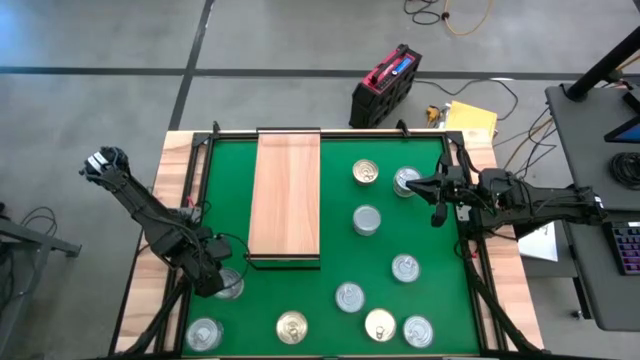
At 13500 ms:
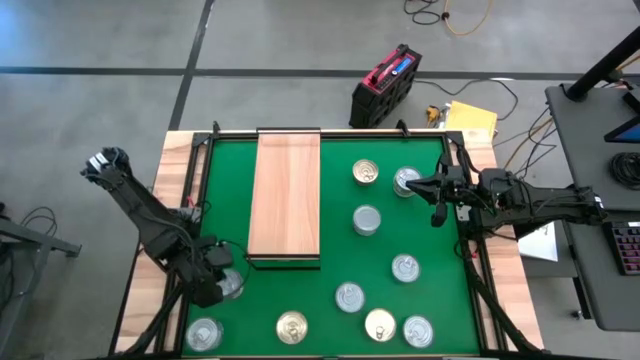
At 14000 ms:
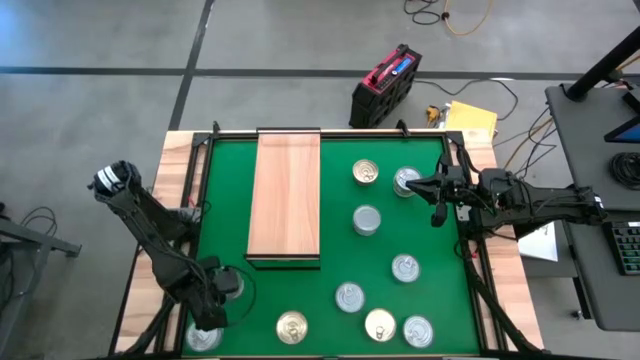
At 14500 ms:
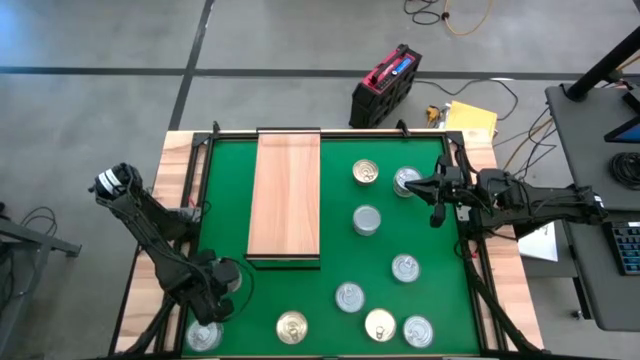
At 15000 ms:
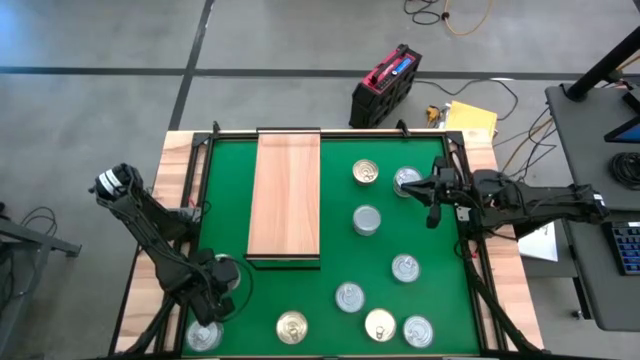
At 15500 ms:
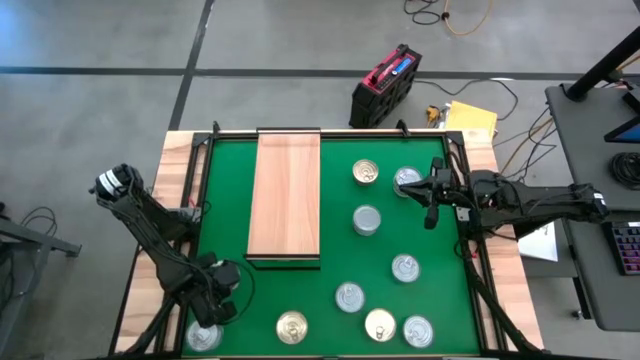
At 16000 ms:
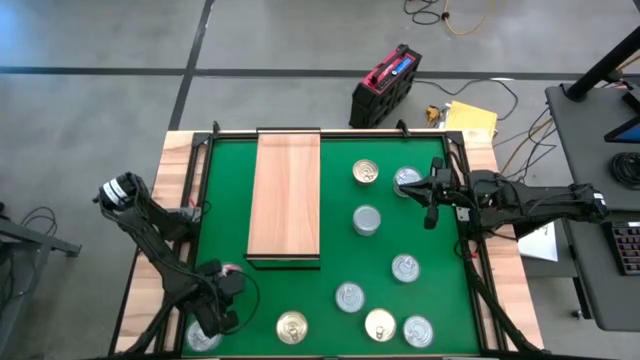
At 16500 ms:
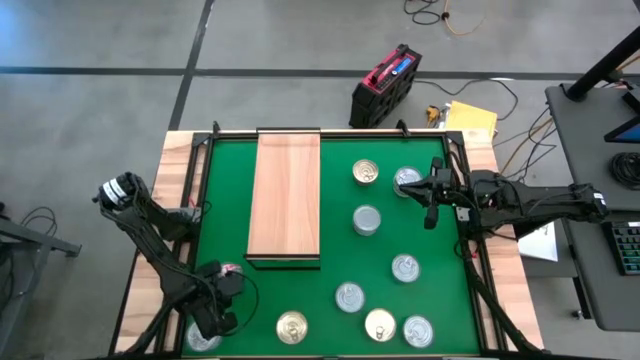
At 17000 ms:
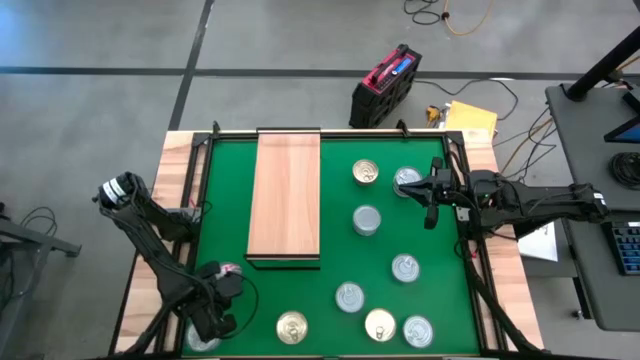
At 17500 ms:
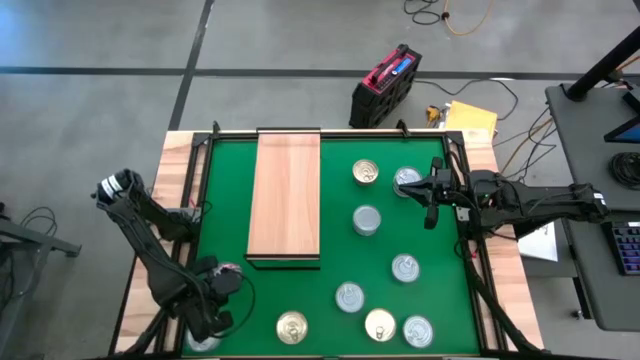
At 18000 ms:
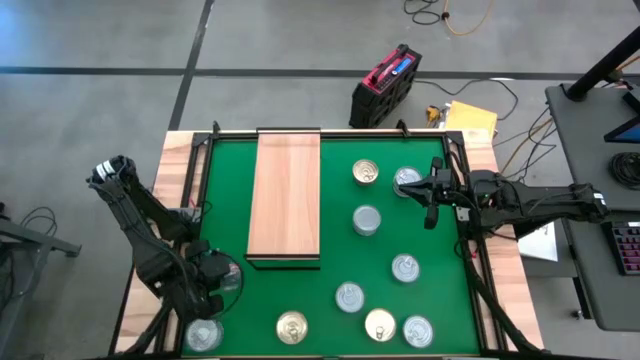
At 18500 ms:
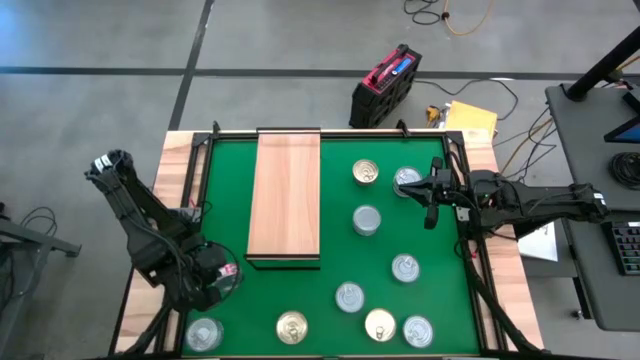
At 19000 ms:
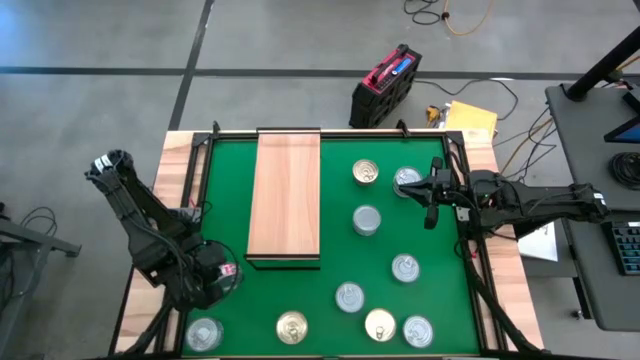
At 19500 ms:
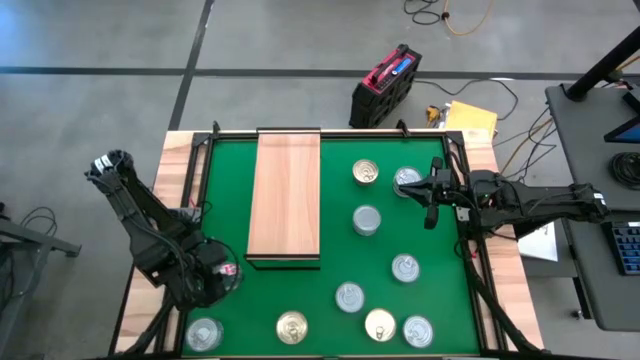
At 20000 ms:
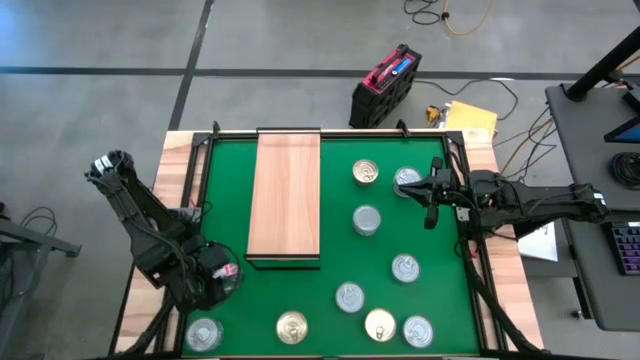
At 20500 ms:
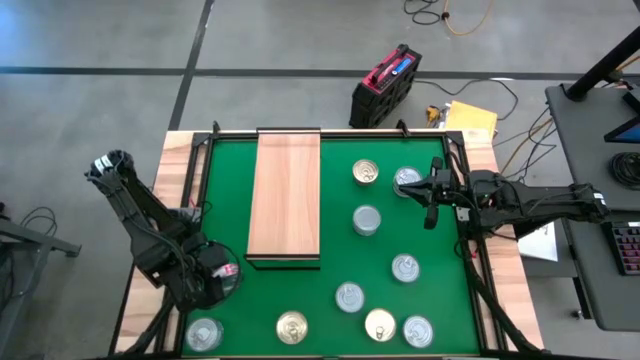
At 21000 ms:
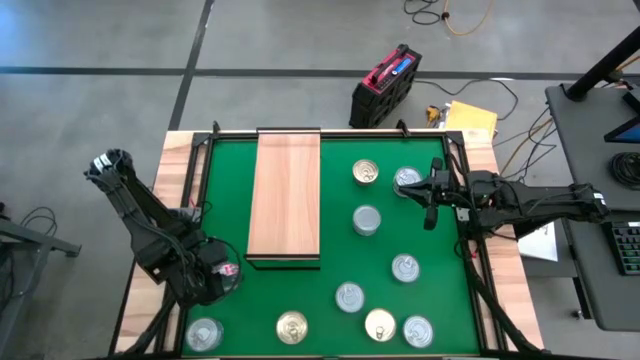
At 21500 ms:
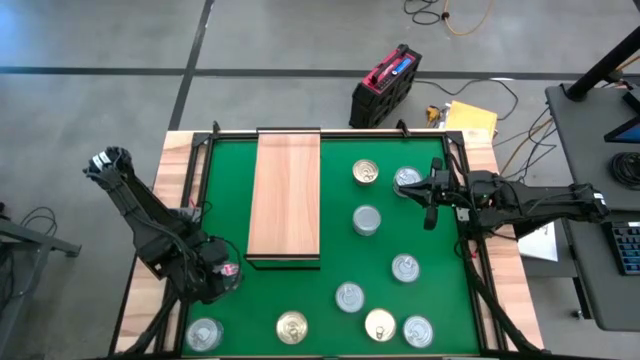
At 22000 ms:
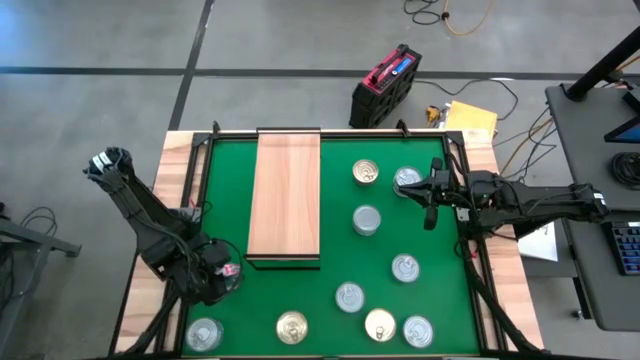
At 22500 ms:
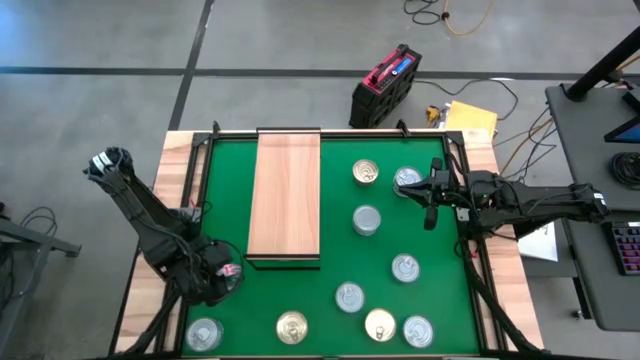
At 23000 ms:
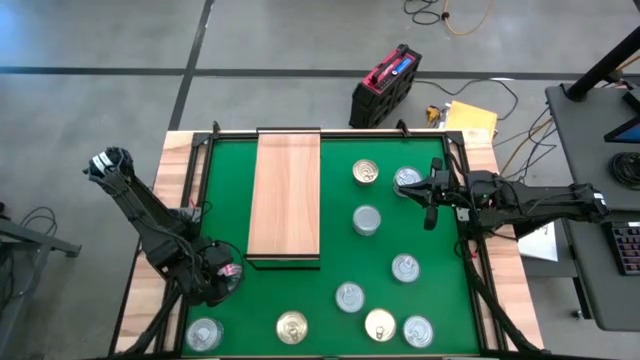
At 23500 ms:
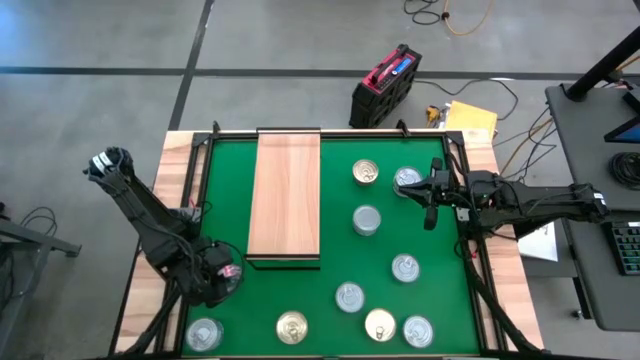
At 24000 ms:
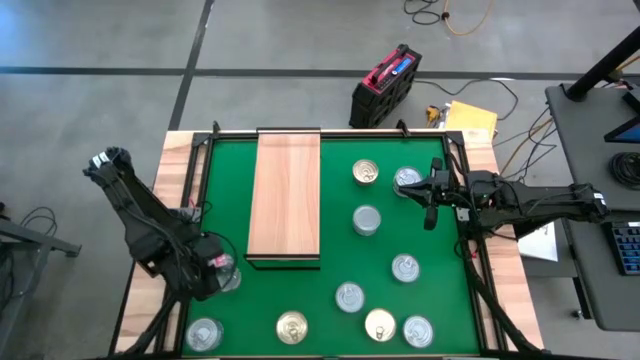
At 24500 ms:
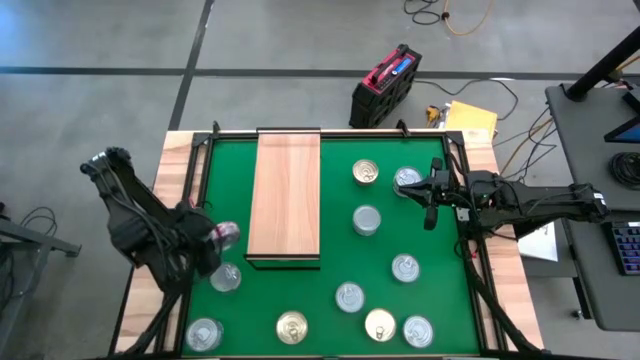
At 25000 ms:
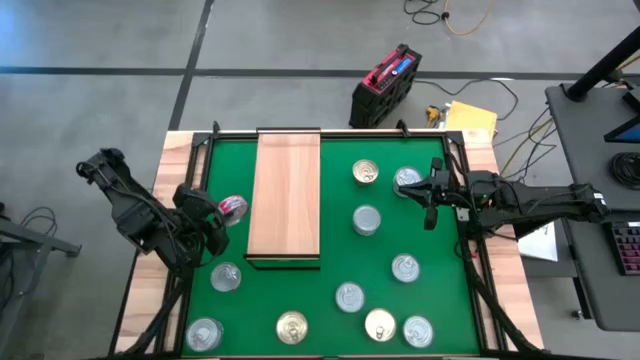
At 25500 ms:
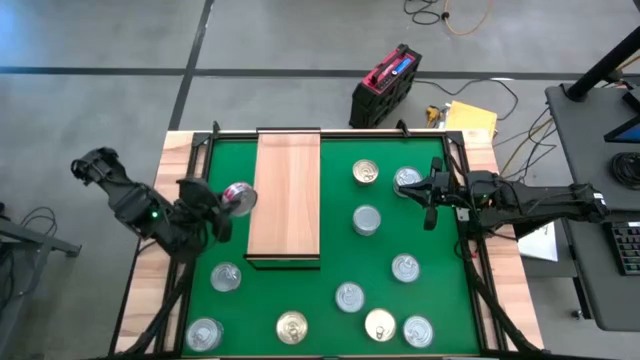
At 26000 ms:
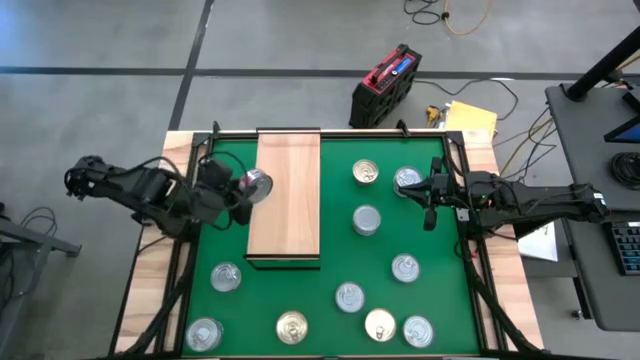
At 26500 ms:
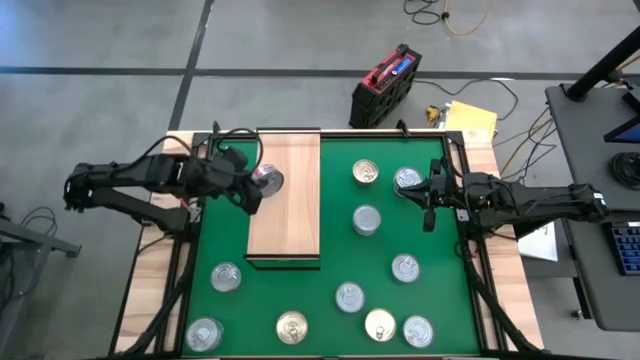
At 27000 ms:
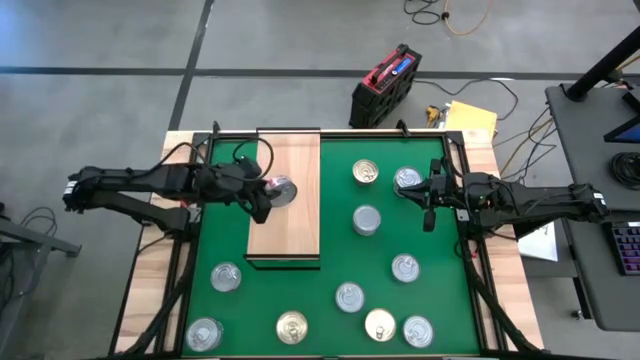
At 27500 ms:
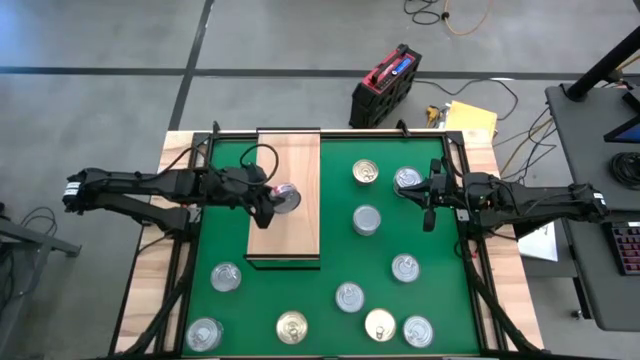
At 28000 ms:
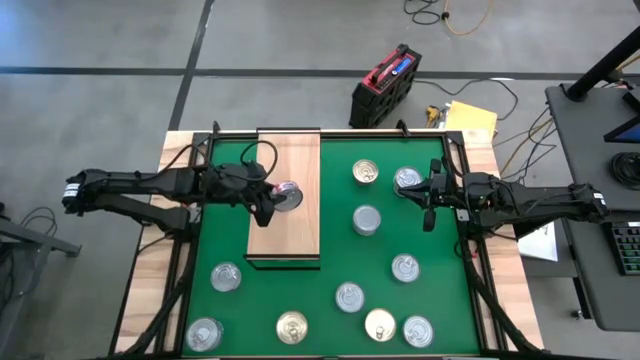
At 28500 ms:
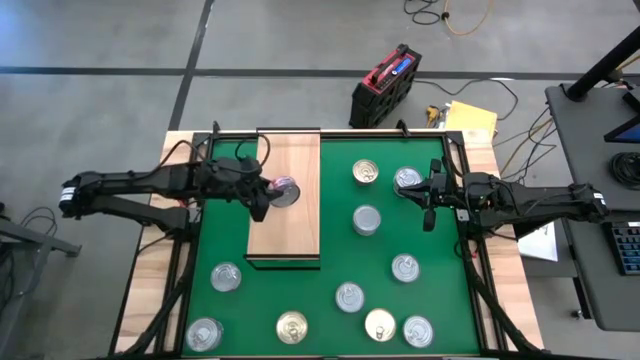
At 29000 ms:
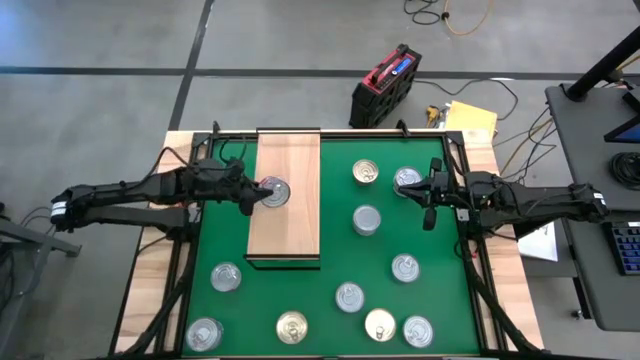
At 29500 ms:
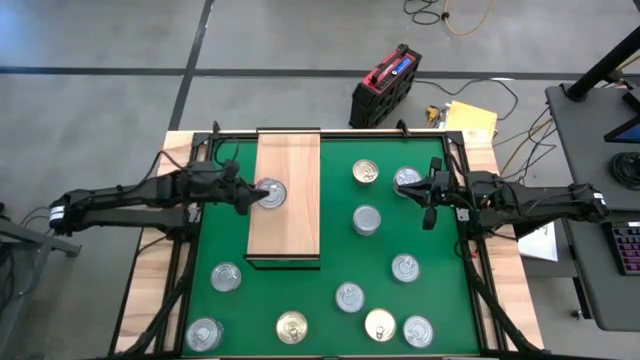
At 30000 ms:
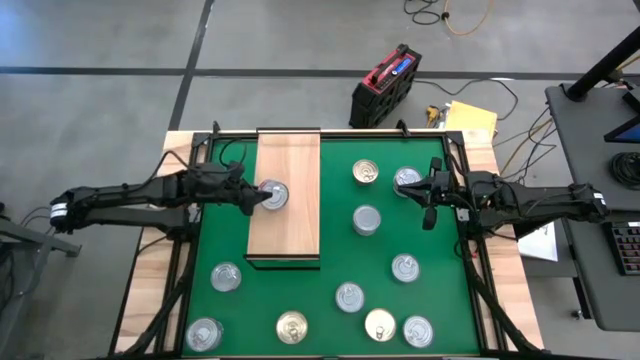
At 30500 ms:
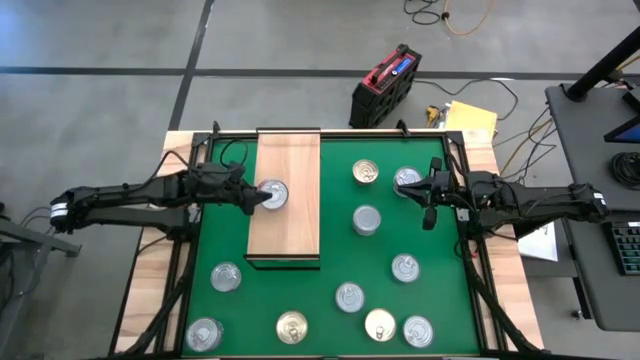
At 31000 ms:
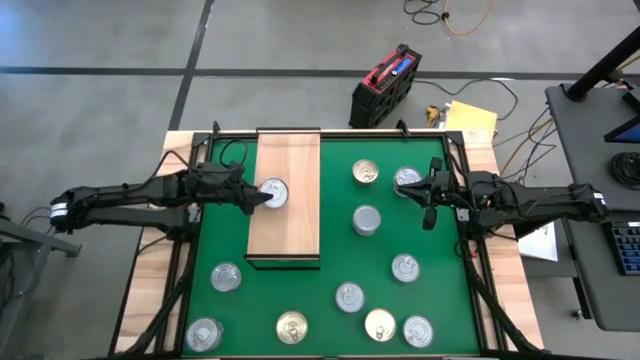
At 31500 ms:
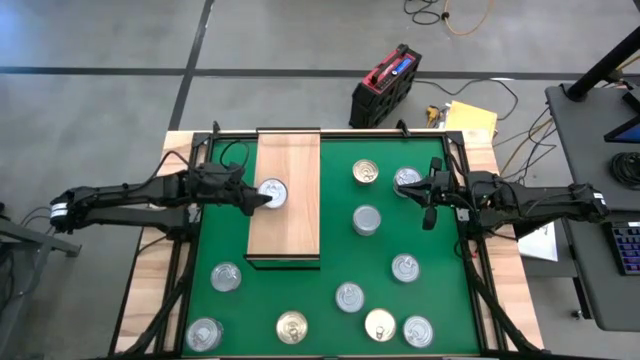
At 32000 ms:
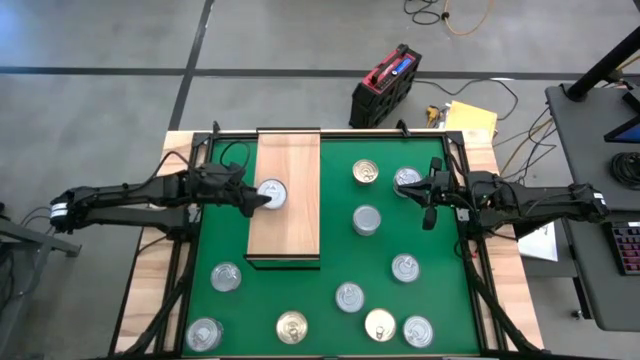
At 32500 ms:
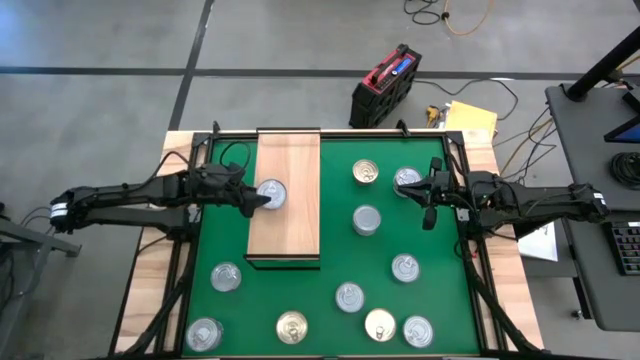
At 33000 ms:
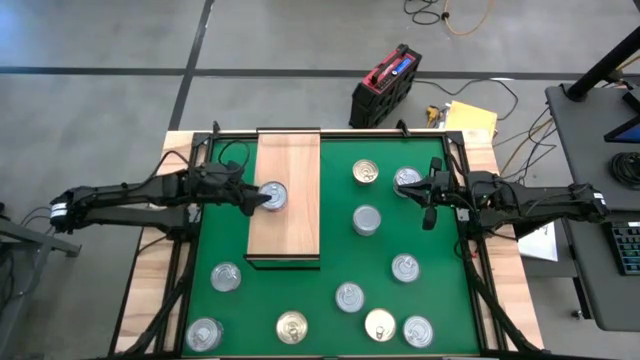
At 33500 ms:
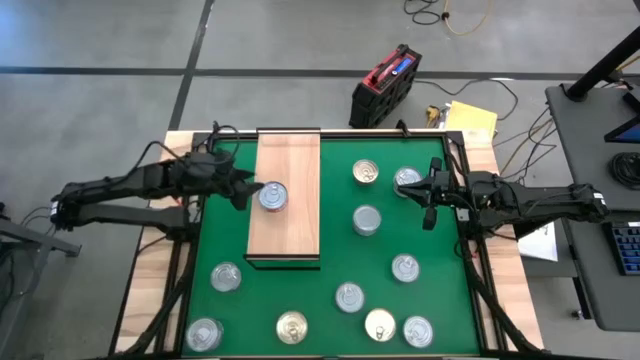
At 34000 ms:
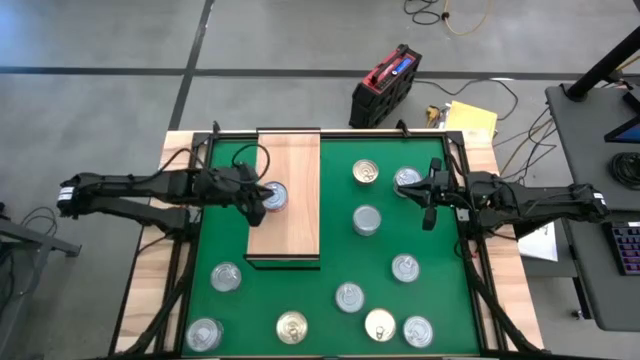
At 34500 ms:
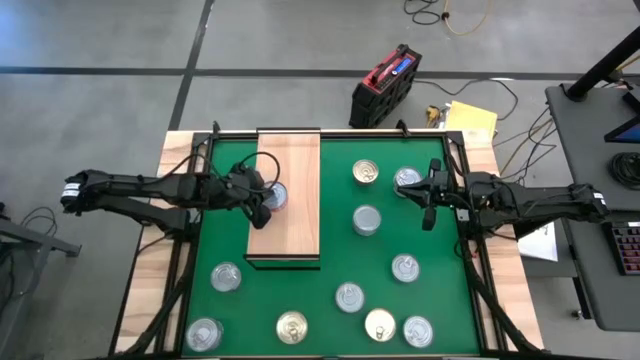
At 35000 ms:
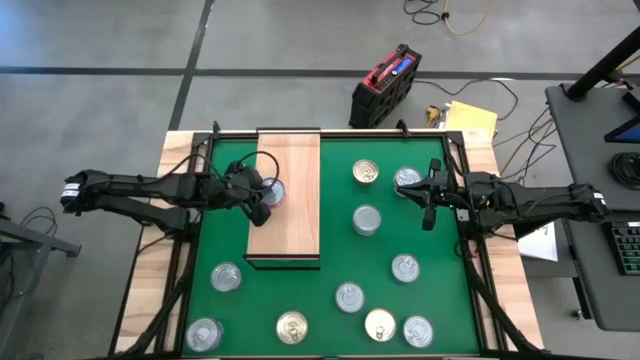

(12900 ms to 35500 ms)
Task: Stack canned seafood by type on shelf
Put the red tuna can on the shelf
